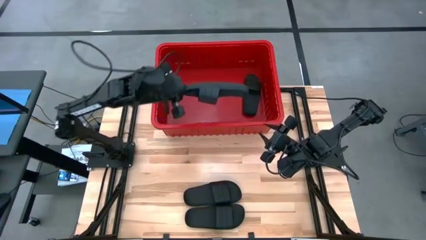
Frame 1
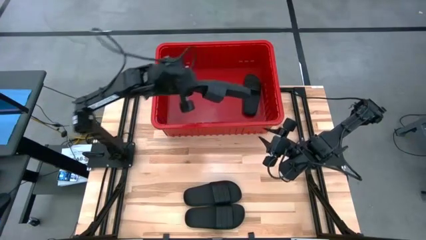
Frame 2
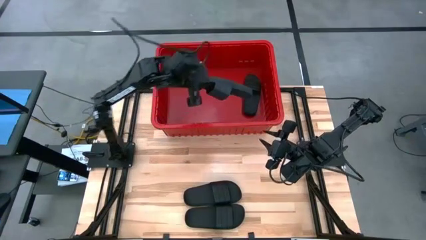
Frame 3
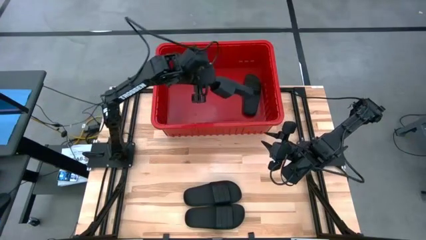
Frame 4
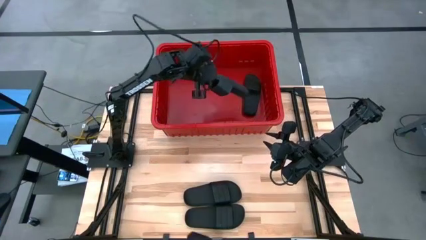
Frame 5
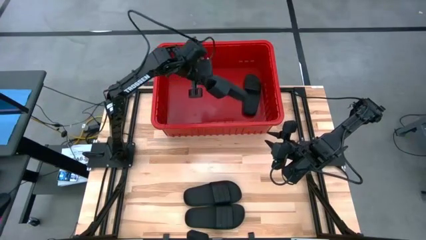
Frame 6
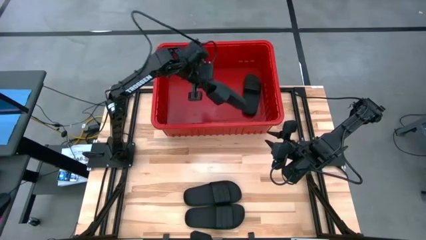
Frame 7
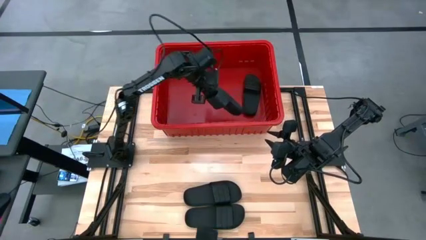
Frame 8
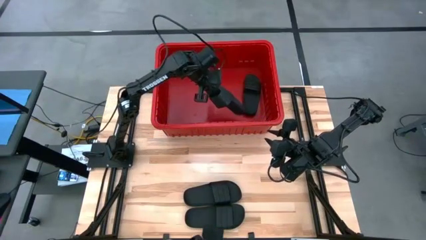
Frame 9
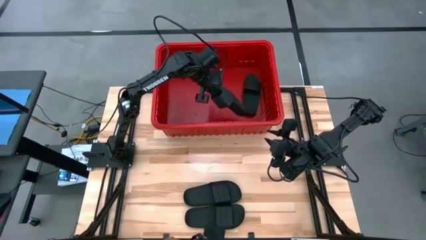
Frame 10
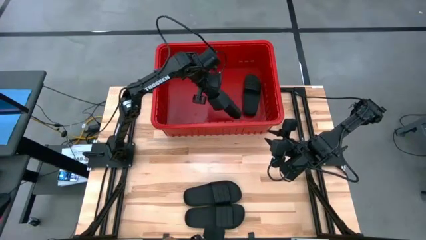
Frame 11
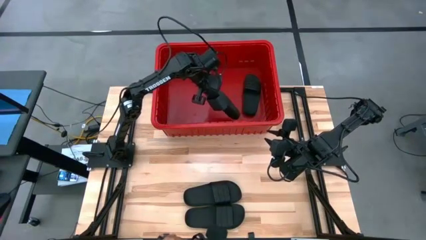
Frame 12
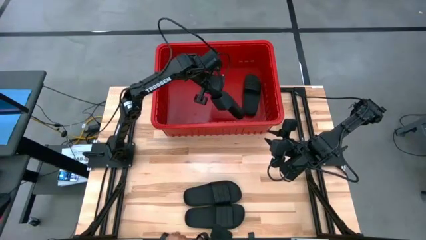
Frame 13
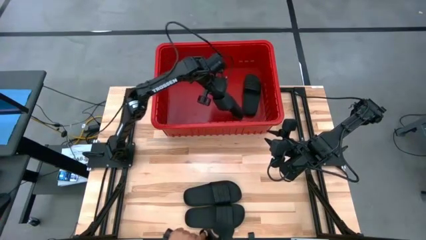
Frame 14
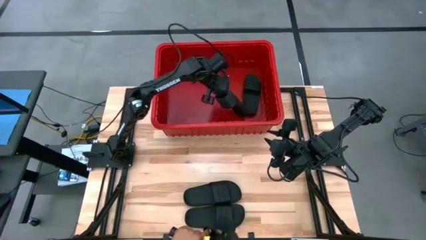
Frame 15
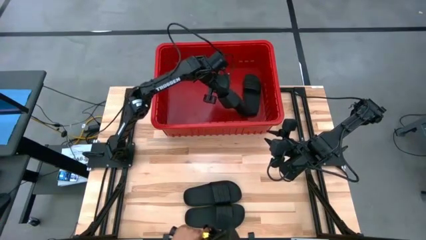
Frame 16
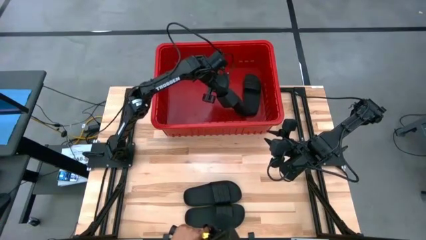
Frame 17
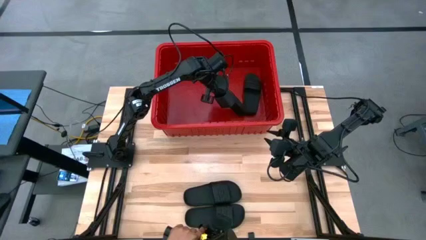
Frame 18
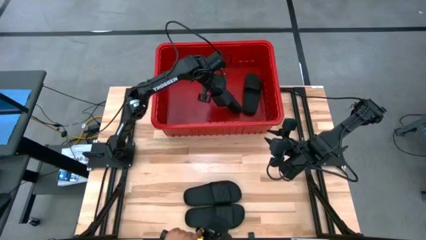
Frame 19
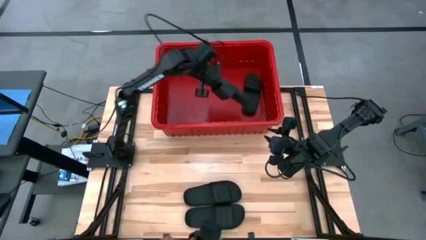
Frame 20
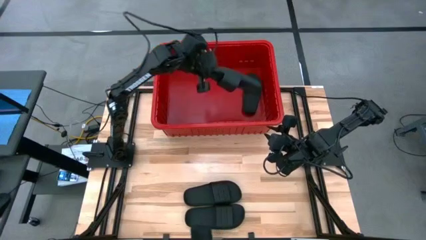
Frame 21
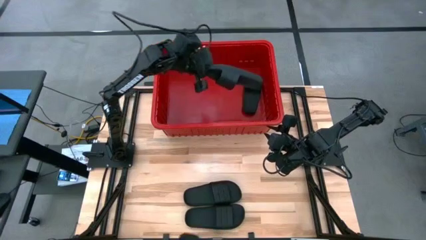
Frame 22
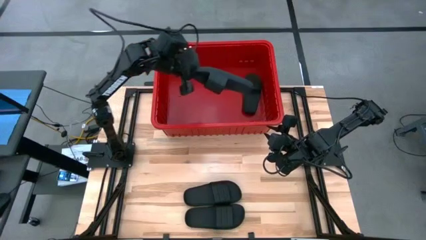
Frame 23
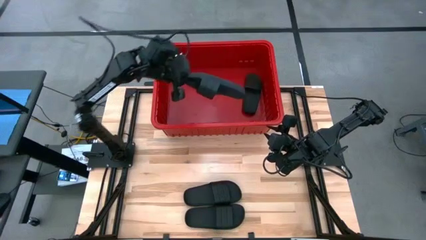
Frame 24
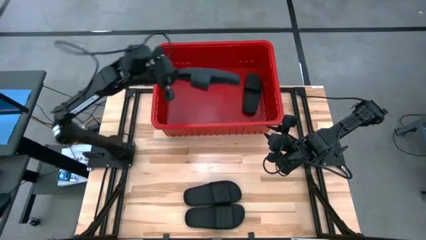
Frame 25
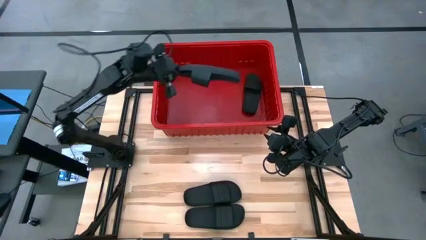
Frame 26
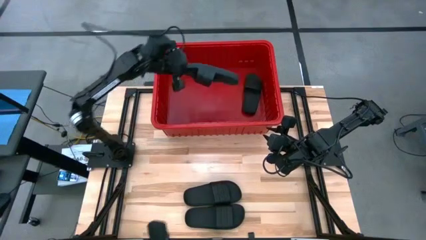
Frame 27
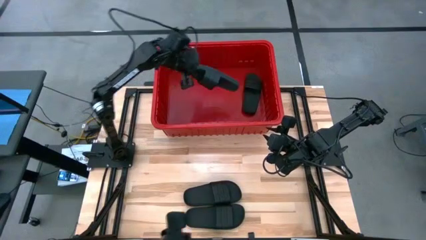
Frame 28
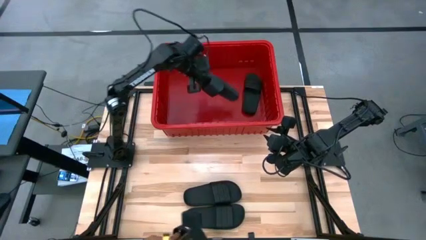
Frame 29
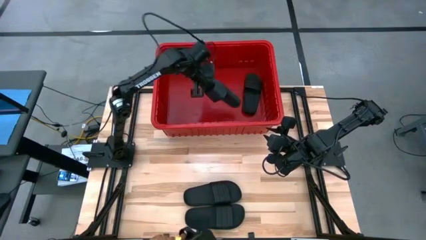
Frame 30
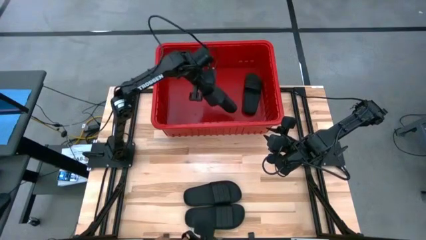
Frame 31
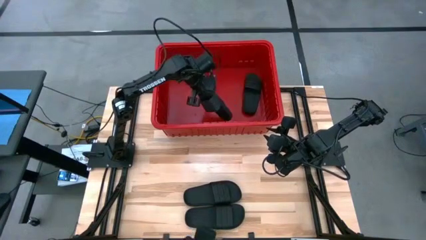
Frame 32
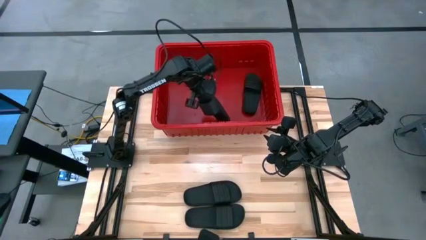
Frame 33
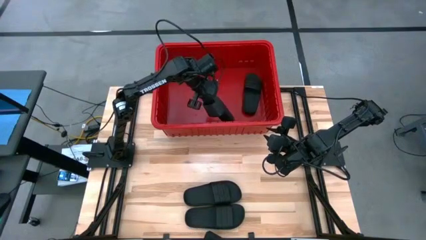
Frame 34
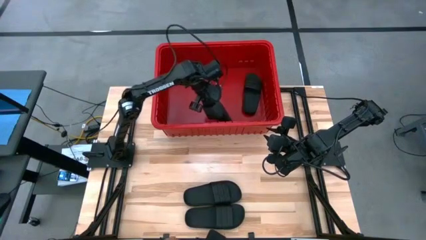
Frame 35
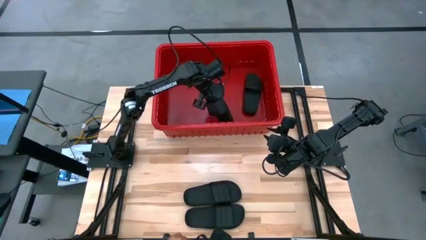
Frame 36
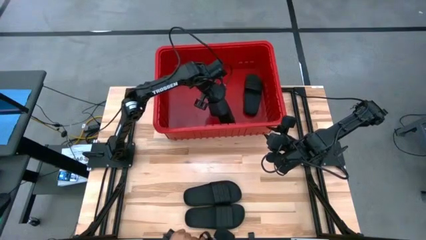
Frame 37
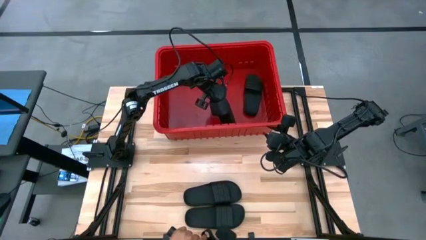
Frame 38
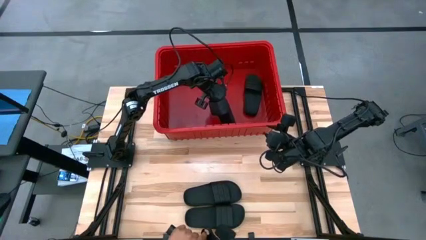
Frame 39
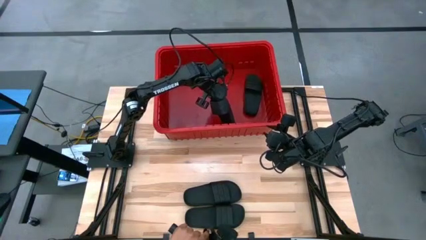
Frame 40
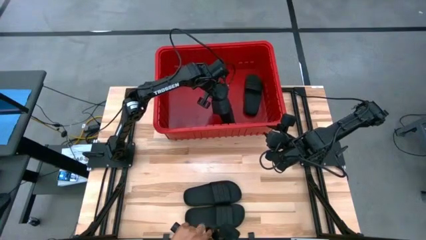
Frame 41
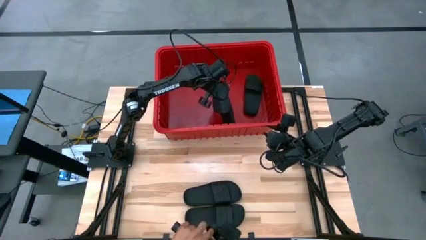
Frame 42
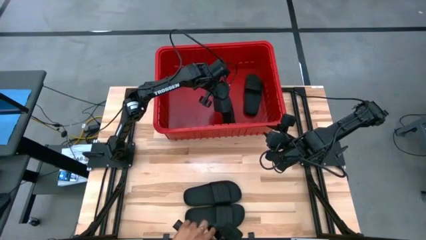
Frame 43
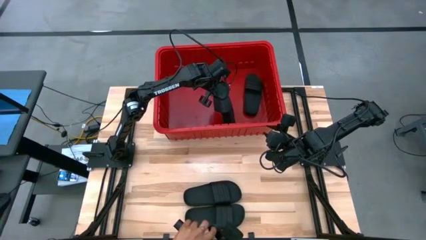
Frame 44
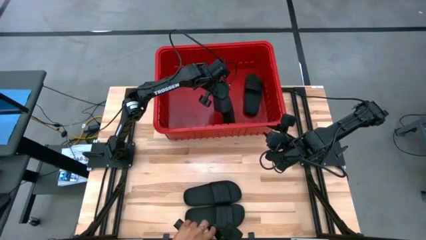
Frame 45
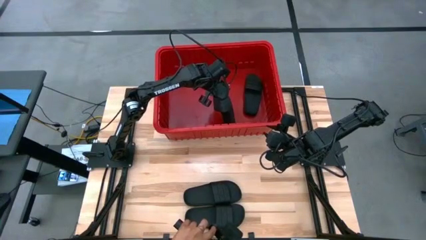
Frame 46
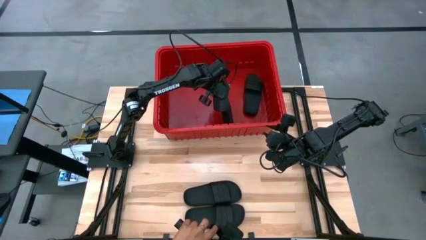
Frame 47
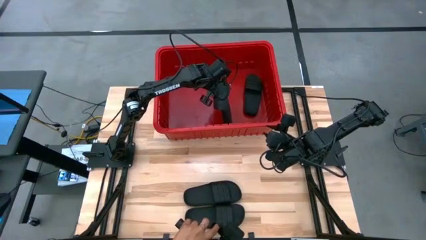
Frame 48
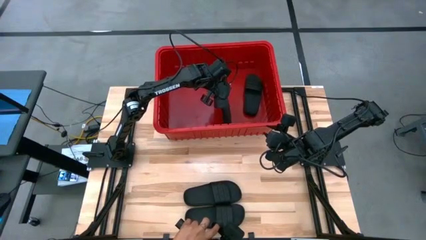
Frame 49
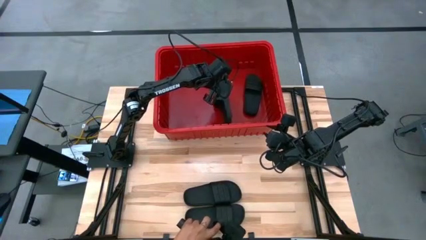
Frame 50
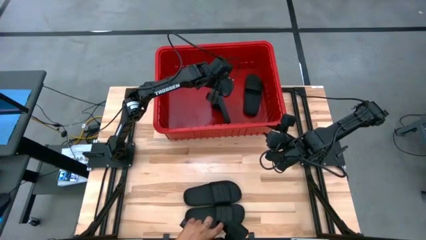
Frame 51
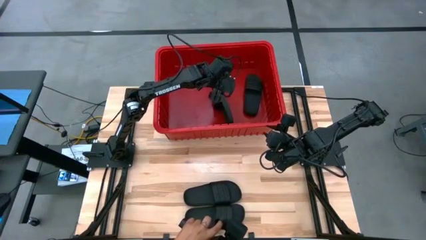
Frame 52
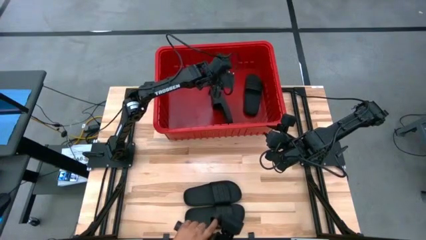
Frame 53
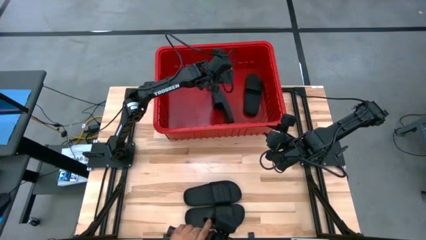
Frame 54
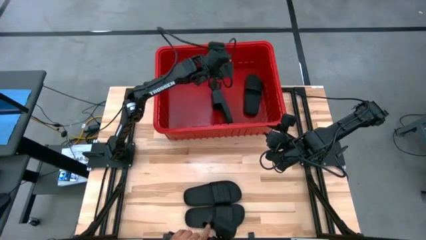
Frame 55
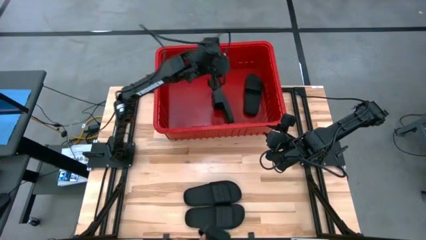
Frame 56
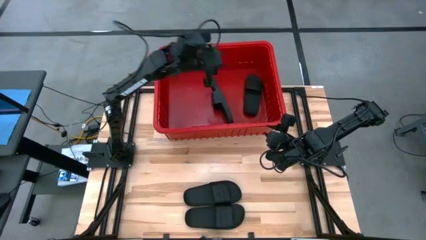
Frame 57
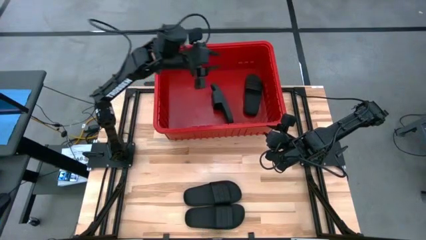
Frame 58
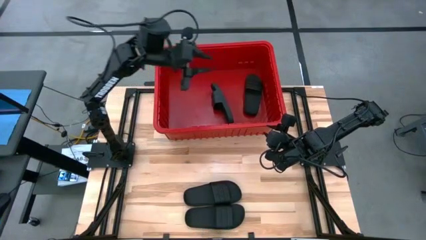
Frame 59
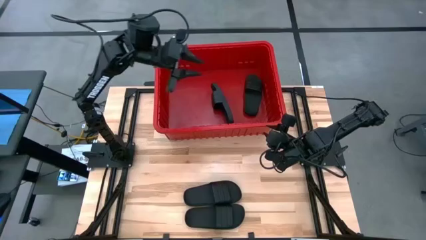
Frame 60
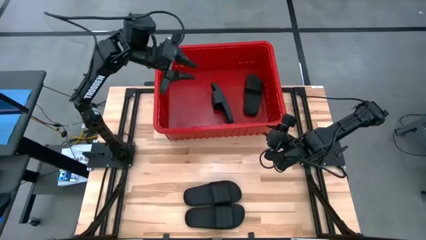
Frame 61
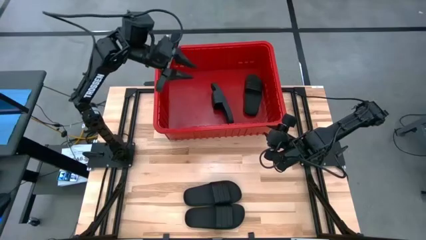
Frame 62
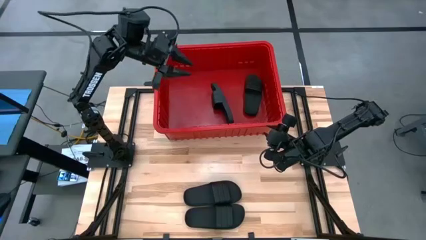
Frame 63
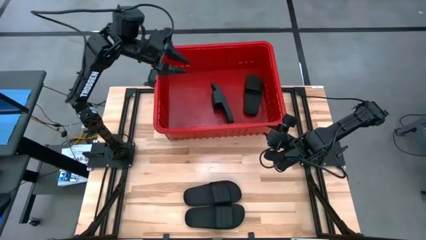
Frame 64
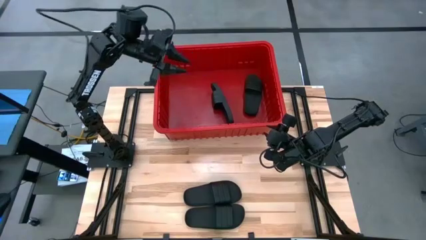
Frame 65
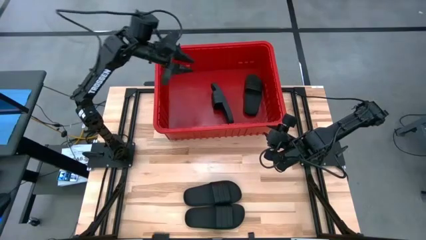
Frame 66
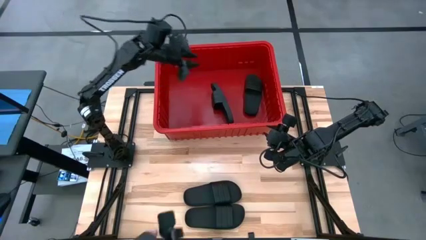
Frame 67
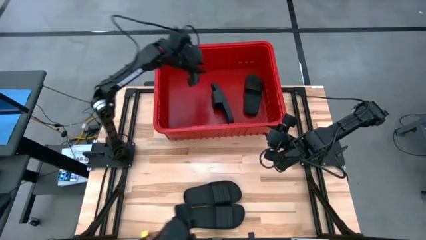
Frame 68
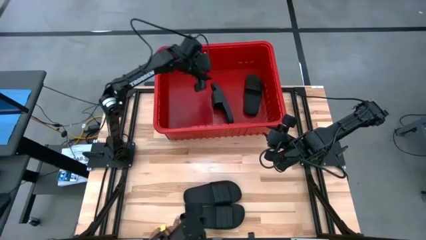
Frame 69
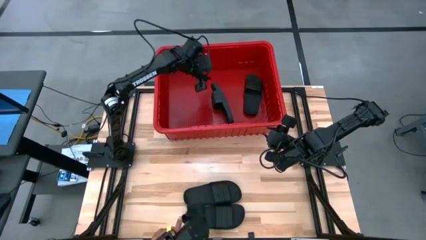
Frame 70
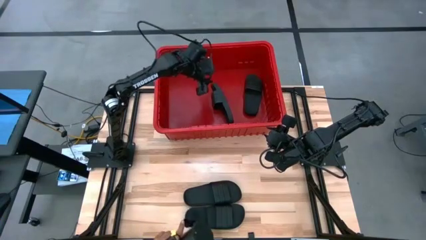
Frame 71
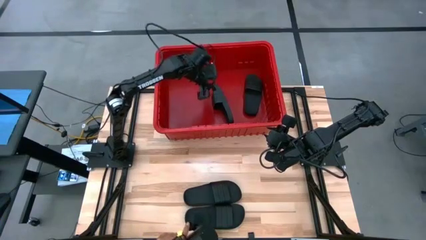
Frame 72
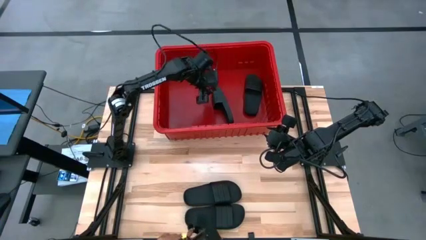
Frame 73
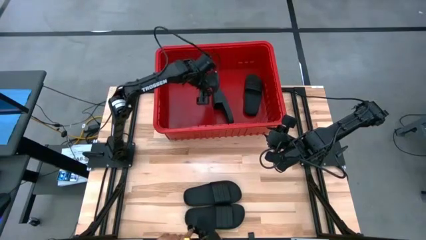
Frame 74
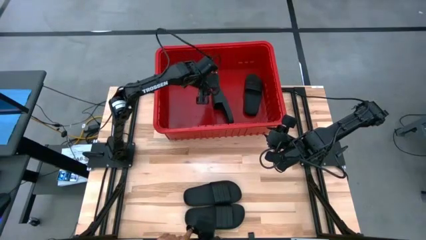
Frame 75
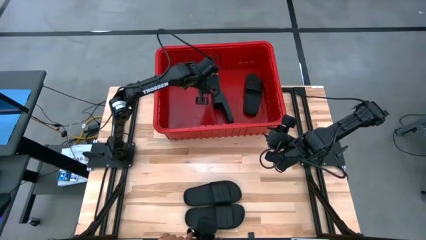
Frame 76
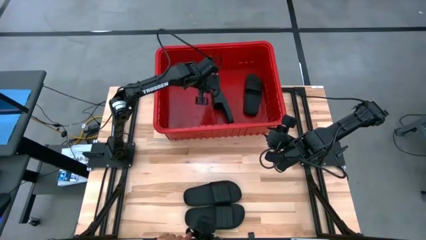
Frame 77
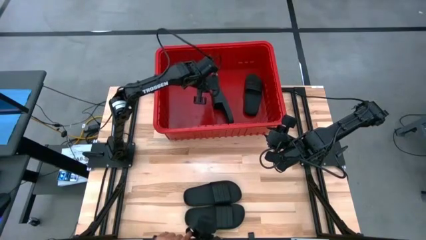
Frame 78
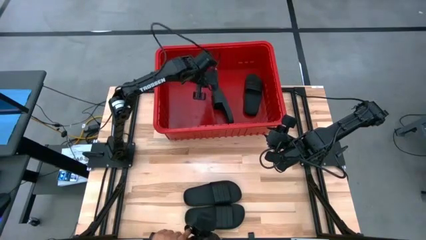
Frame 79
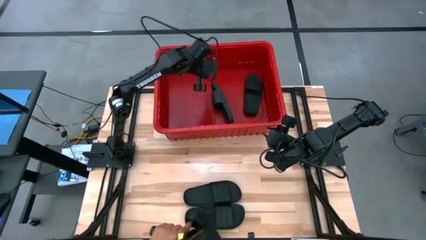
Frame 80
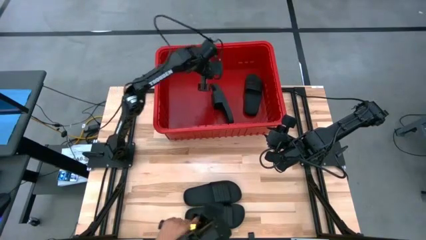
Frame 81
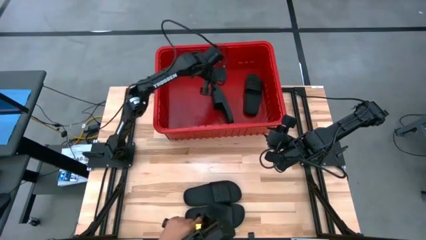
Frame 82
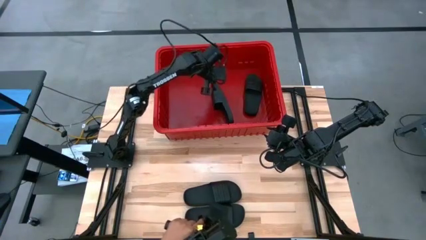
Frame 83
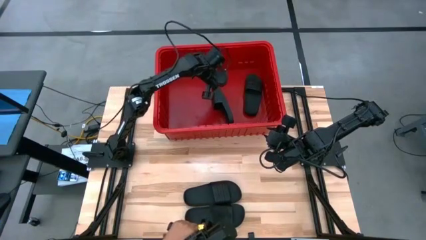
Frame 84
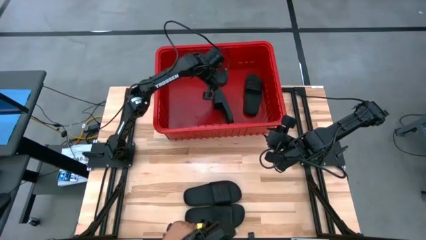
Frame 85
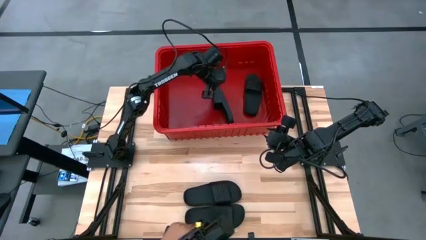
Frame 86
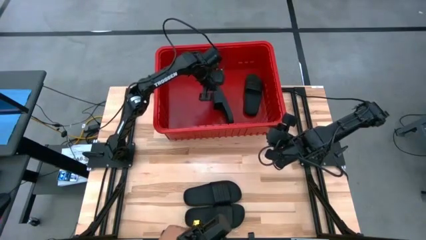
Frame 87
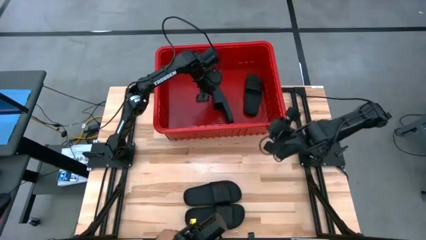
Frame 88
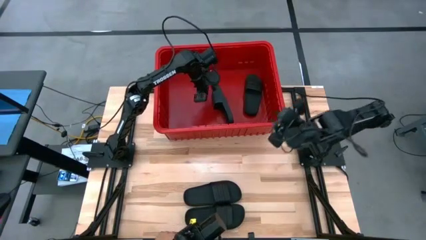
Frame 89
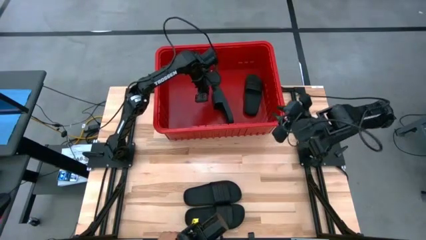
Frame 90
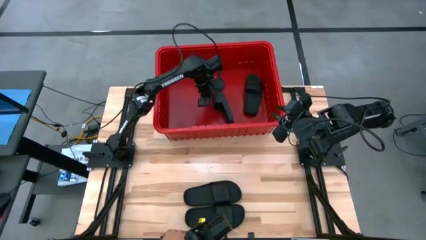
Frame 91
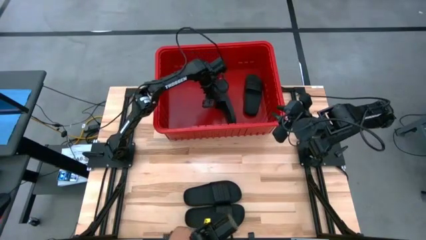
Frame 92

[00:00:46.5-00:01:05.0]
Task: Pick and place slides into bin
Put the black slide into the container
